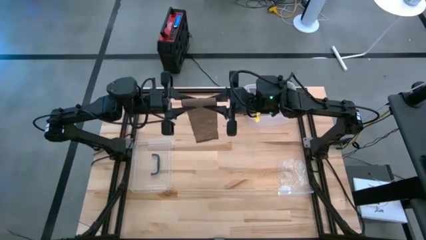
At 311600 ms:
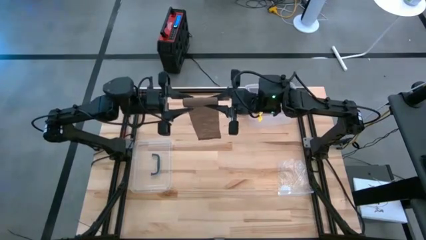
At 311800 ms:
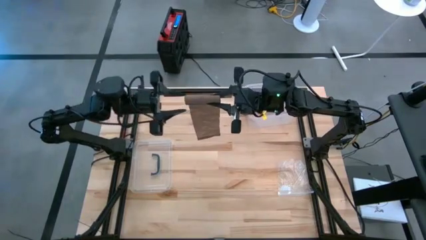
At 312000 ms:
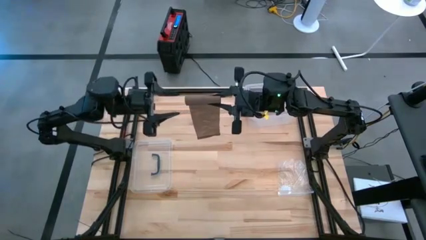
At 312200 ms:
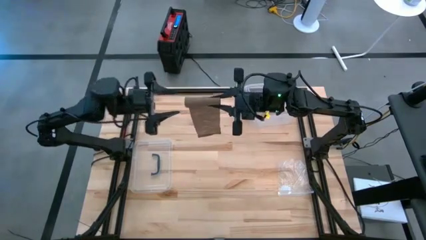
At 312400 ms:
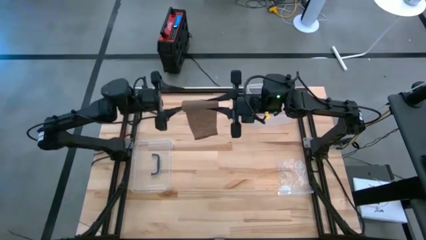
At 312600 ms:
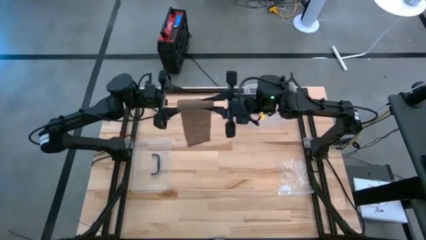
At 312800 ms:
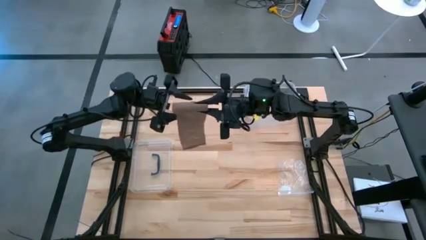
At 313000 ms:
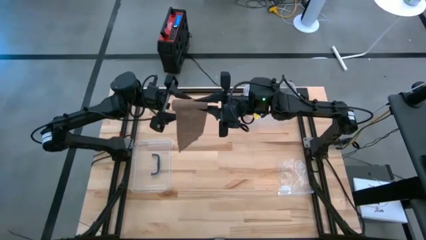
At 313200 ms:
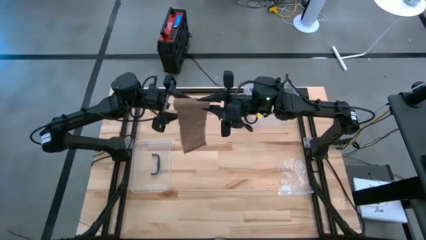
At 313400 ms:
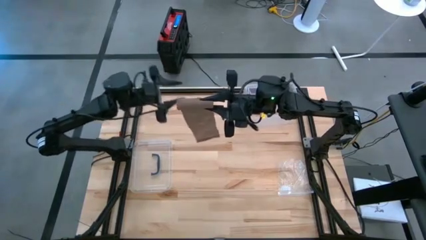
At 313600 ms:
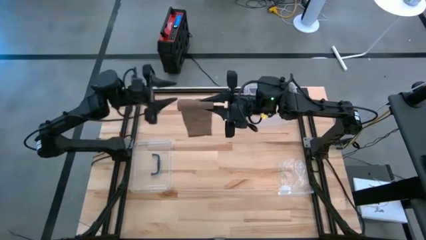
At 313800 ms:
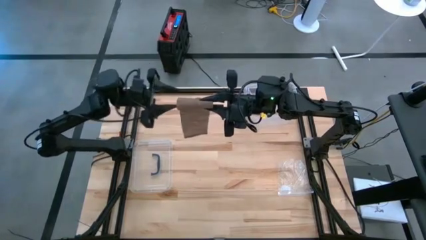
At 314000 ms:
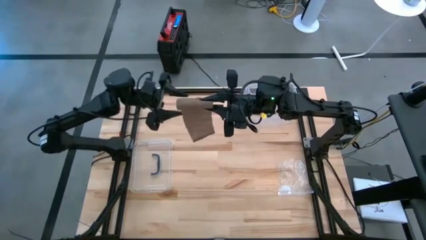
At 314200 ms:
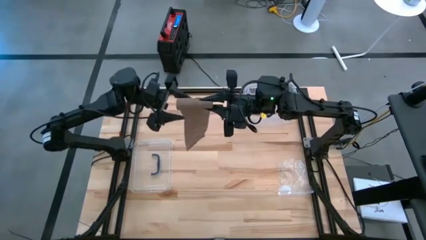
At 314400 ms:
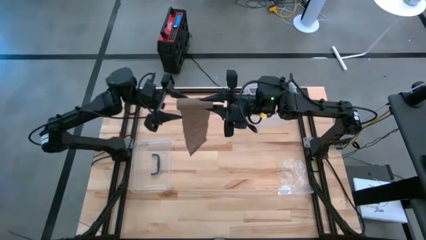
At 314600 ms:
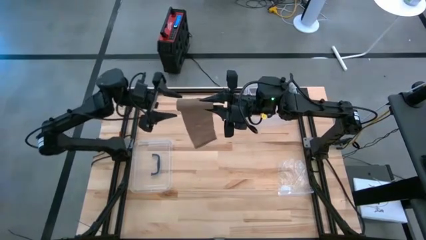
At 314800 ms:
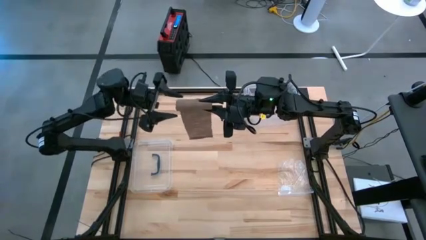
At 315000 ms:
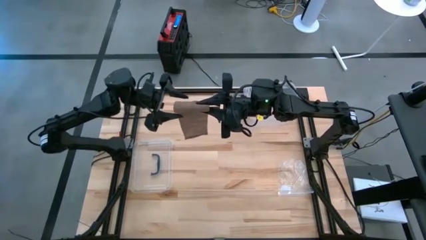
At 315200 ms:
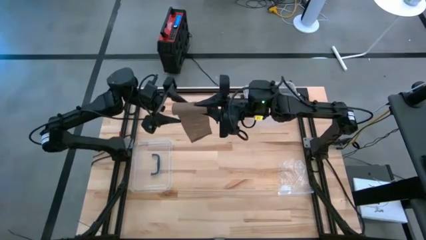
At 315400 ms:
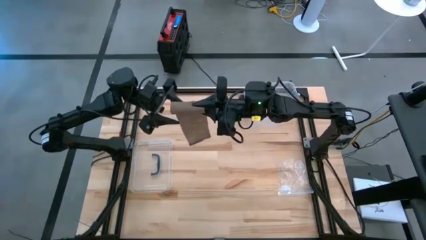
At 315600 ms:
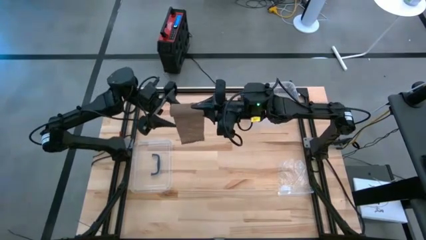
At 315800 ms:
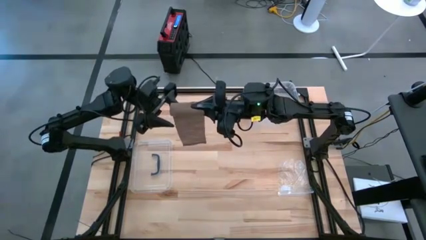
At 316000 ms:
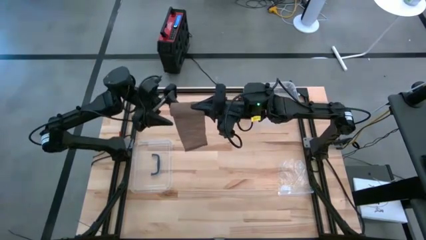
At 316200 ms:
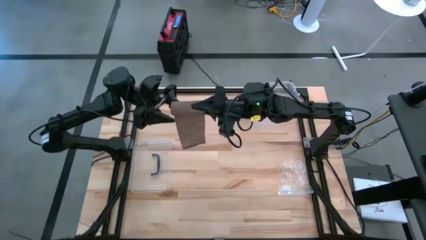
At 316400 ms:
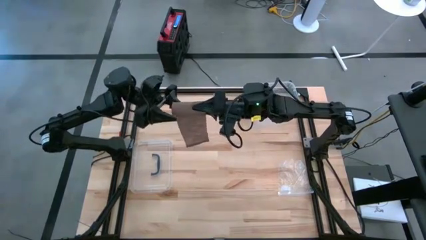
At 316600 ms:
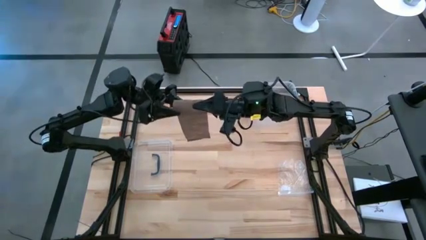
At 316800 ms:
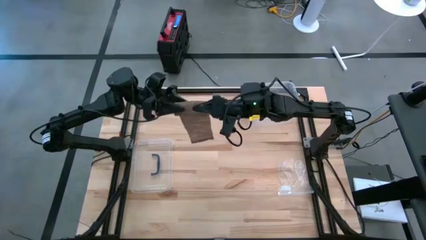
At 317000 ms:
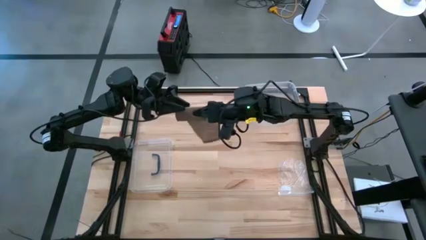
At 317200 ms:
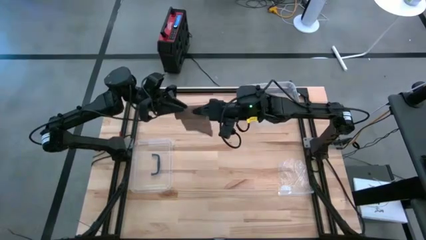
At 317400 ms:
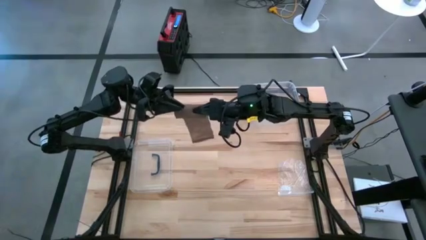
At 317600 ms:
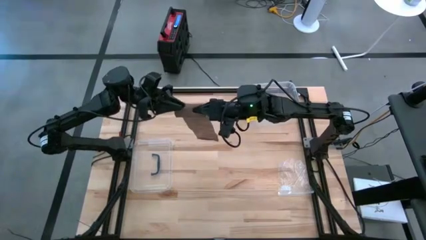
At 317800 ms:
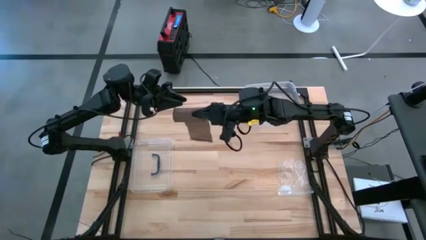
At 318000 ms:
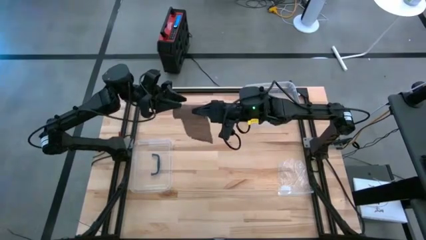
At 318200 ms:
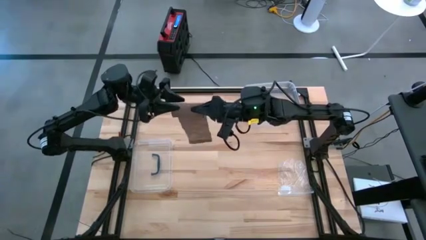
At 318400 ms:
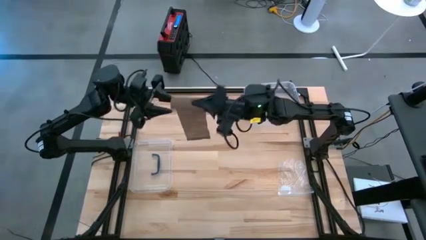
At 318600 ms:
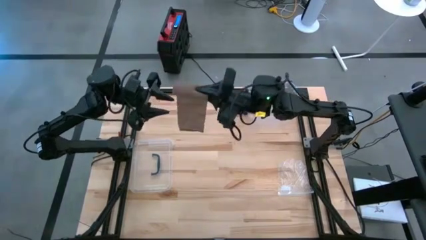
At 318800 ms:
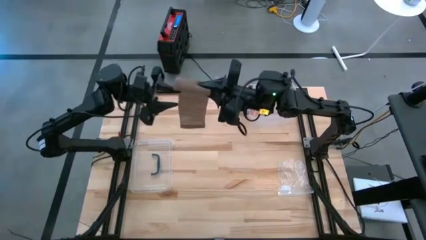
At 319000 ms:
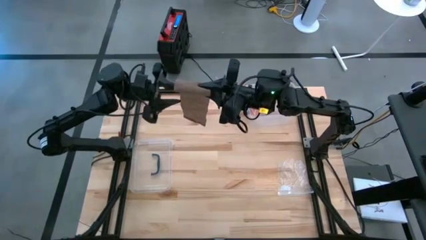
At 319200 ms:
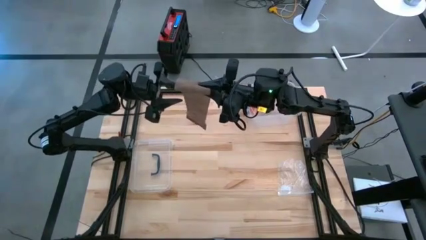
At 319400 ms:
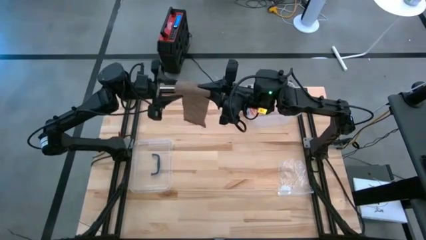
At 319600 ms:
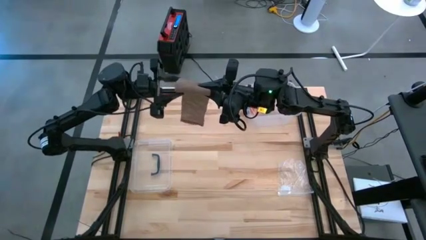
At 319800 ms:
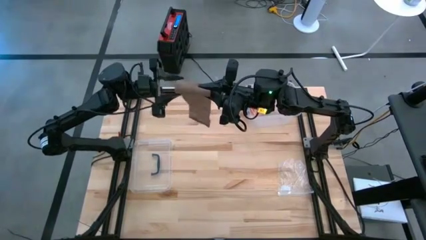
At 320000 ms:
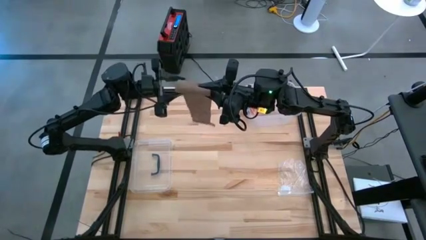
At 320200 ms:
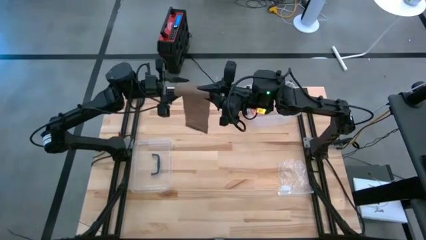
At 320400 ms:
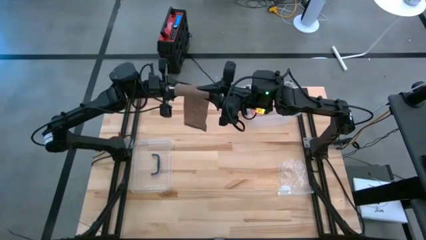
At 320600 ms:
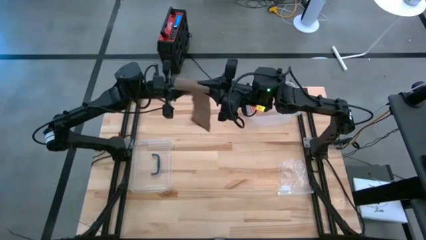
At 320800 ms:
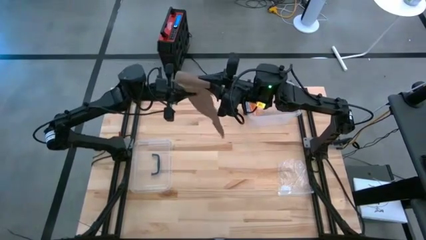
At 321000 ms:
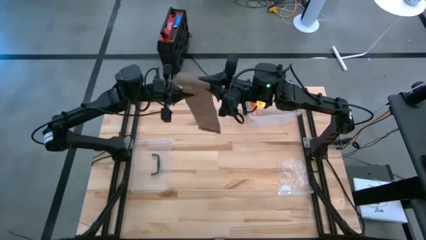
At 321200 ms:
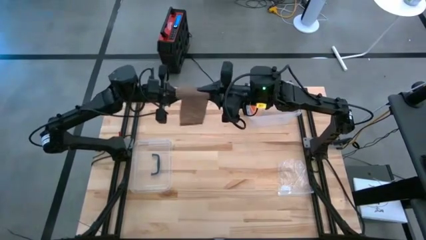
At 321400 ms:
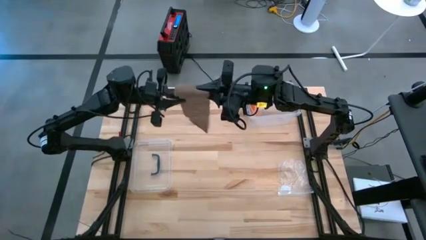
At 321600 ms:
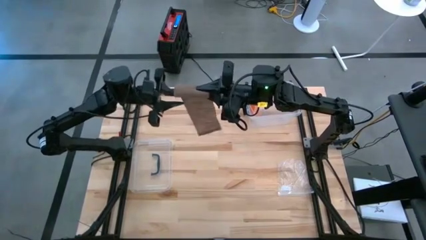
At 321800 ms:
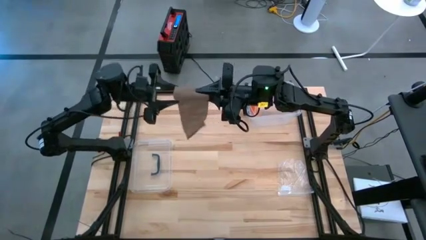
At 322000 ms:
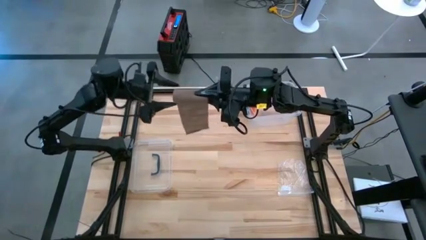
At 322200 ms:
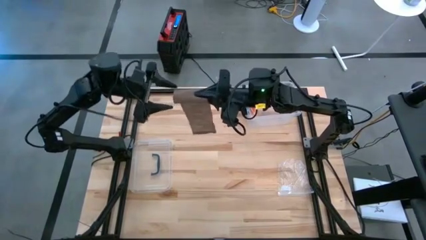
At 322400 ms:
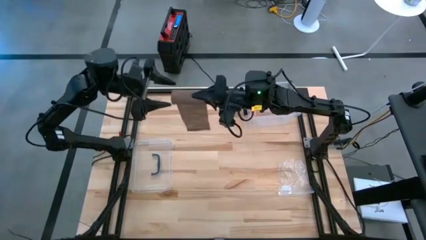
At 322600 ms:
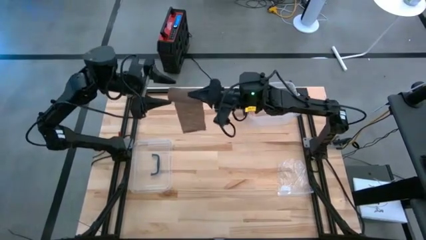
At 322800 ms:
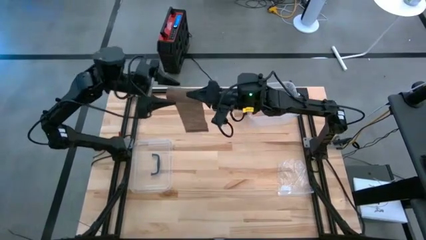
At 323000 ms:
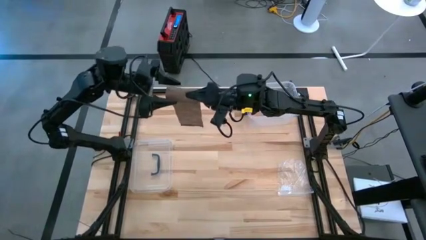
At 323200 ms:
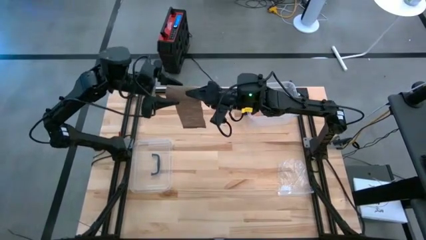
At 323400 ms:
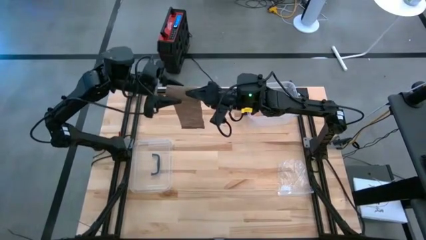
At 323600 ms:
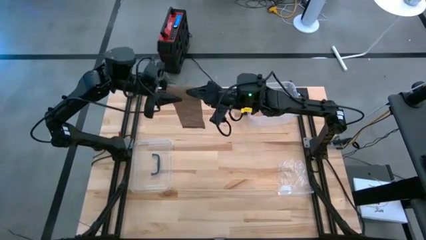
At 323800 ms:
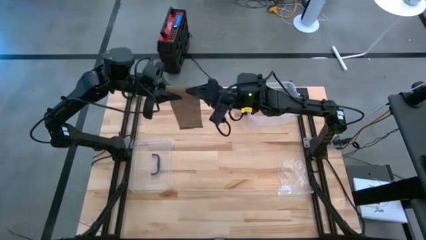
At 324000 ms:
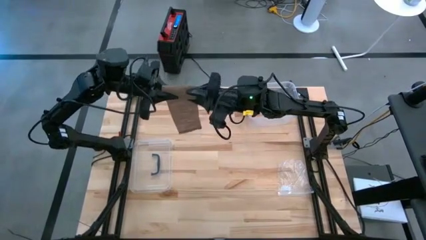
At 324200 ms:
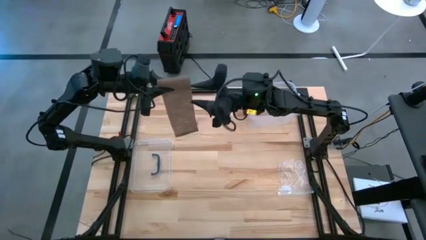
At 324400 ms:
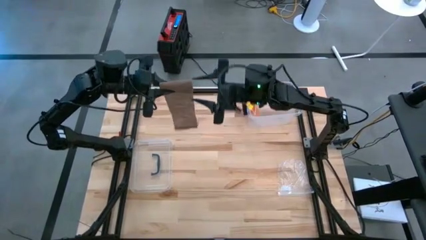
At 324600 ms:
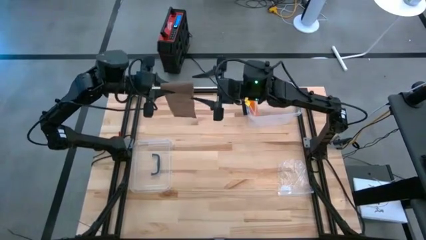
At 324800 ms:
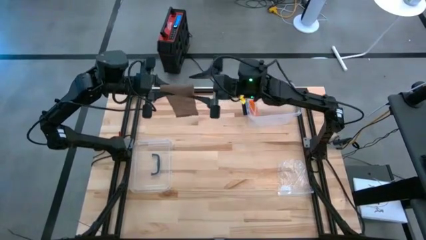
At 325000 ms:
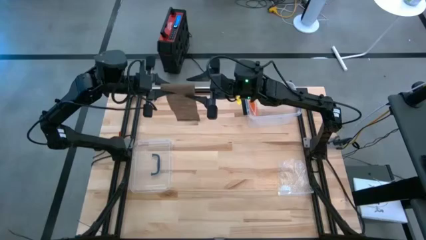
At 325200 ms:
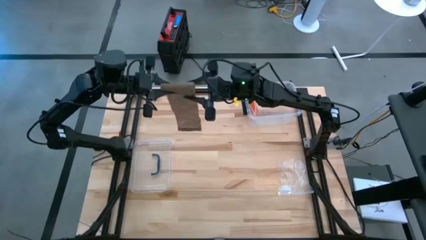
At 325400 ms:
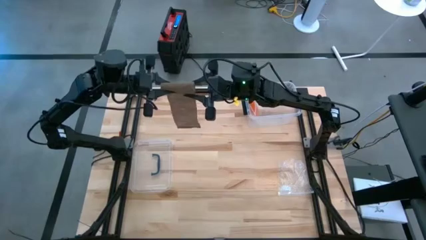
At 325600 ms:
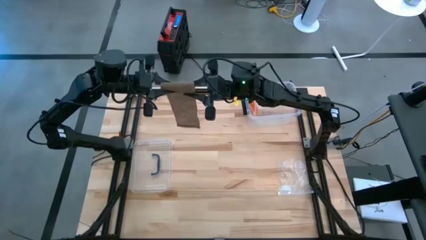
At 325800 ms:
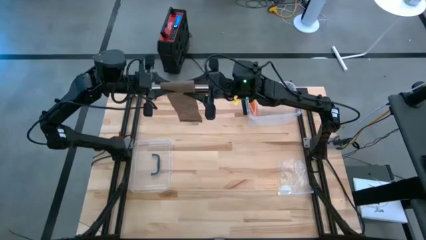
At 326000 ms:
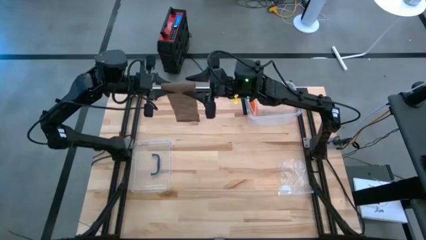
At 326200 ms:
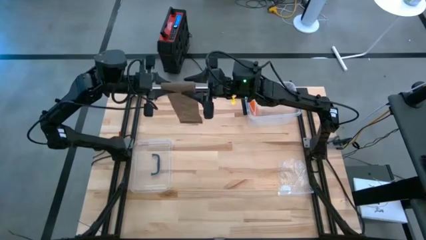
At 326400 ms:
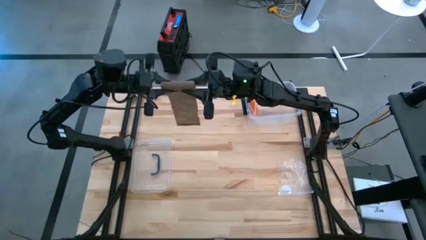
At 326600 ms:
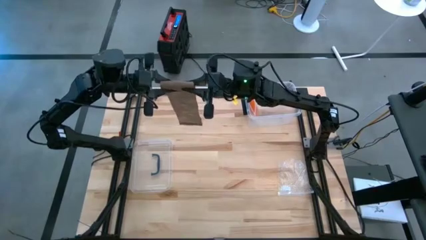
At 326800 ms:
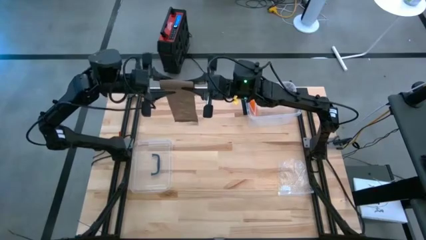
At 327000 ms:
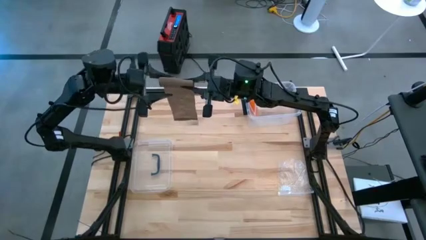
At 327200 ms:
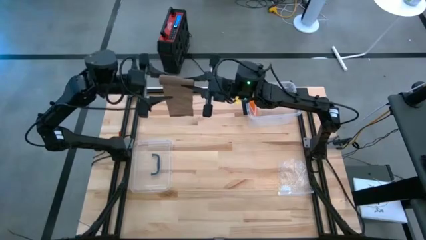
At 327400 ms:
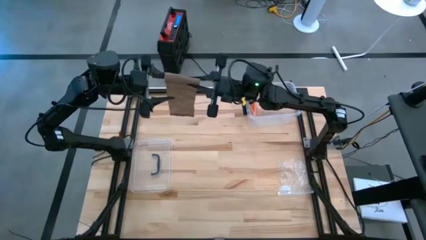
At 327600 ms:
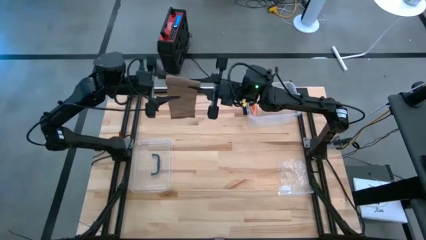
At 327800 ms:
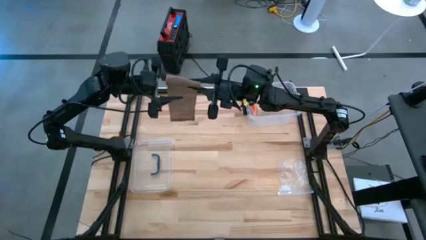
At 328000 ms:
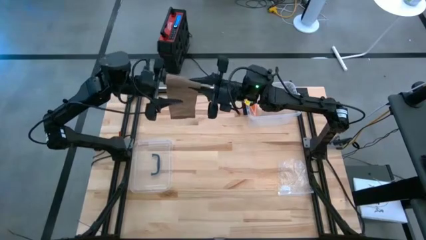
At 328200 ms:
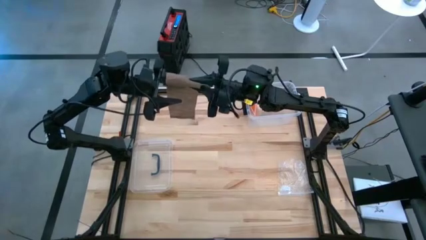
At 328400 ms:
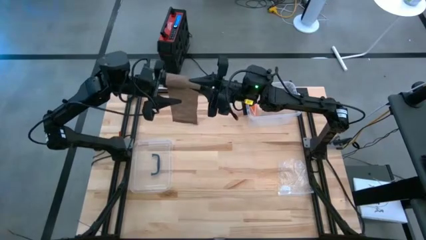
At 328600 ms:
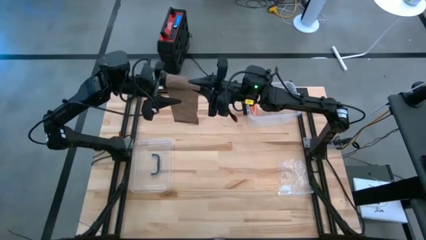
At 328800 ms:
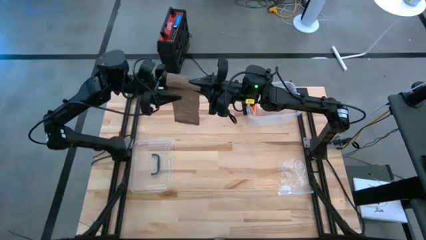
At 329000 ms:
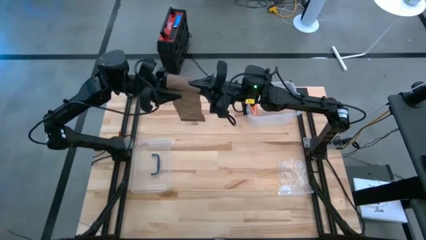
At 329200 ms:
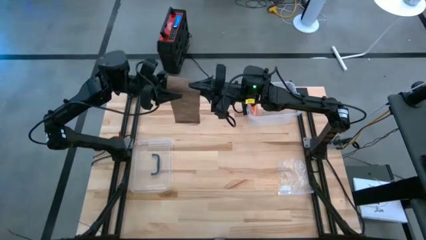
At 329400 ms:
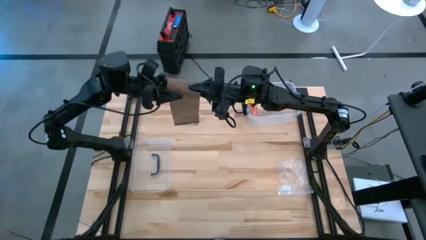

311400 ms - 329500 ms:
Task: Roll bandage
Roll the brown bandage
